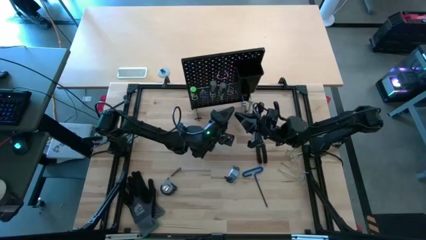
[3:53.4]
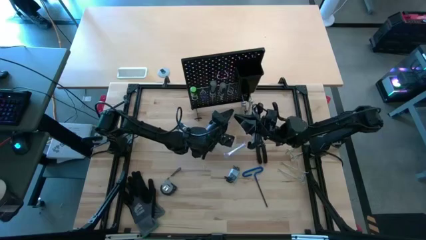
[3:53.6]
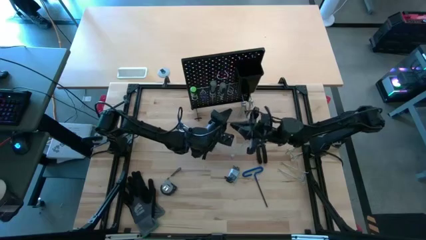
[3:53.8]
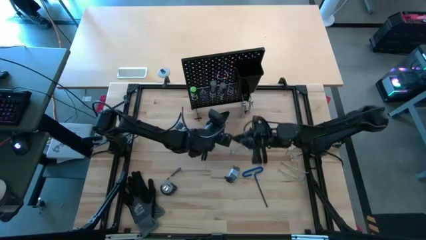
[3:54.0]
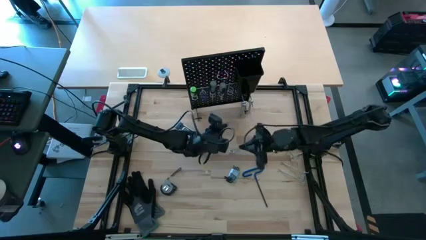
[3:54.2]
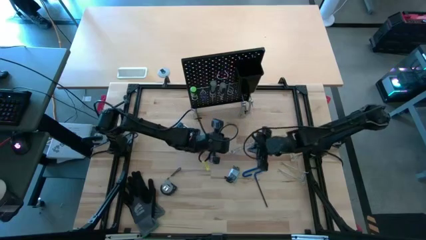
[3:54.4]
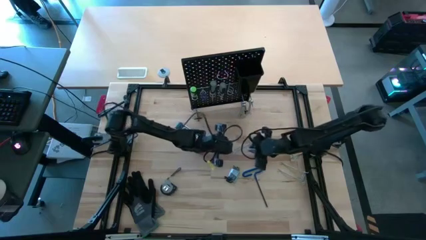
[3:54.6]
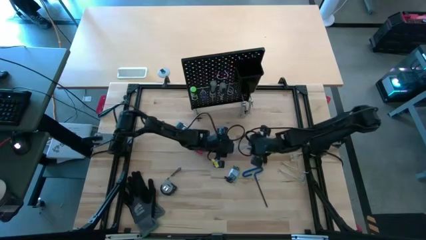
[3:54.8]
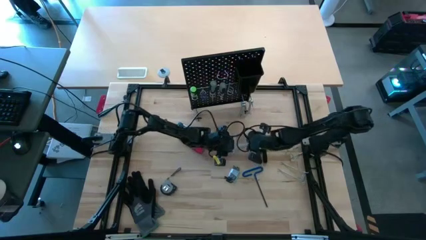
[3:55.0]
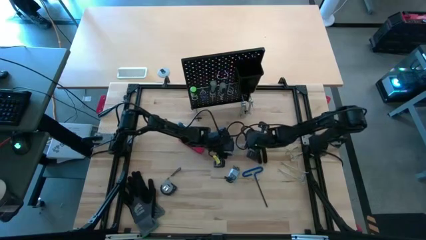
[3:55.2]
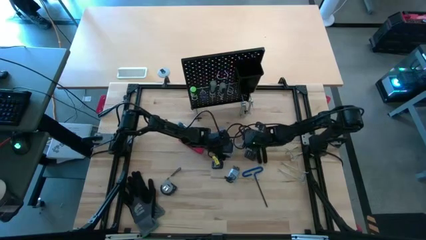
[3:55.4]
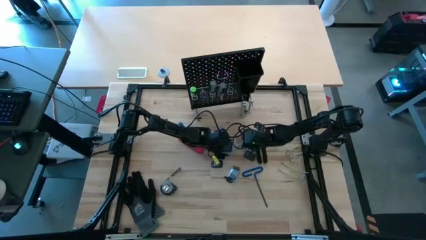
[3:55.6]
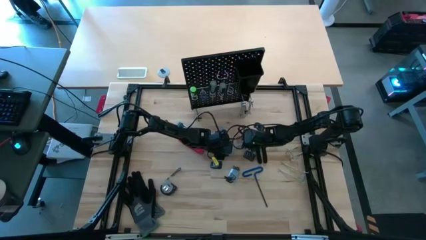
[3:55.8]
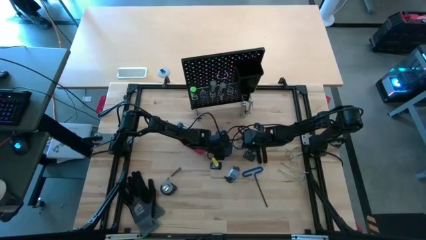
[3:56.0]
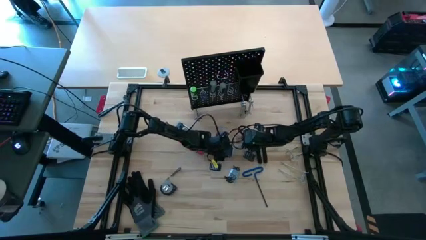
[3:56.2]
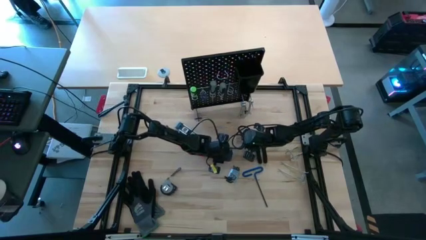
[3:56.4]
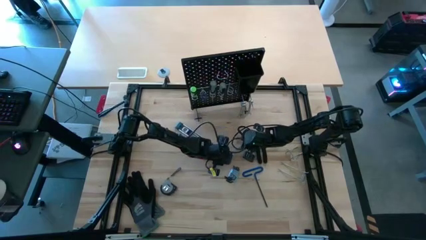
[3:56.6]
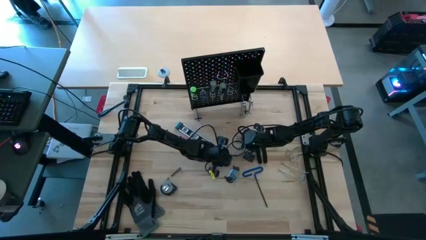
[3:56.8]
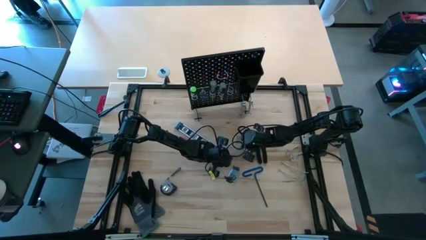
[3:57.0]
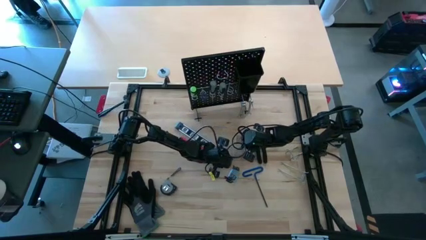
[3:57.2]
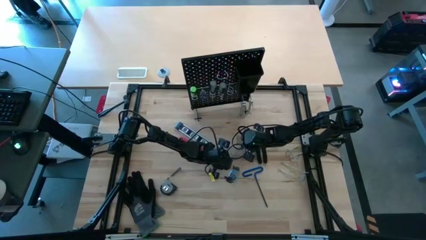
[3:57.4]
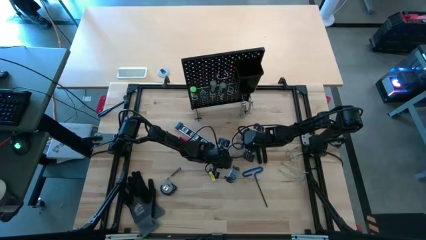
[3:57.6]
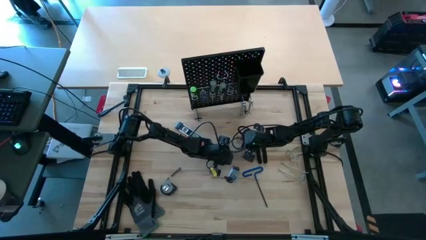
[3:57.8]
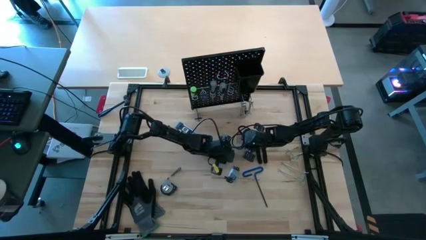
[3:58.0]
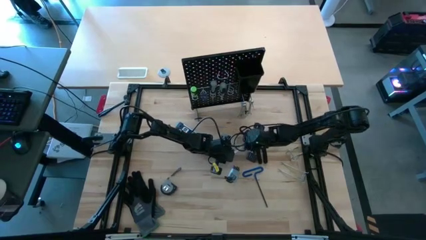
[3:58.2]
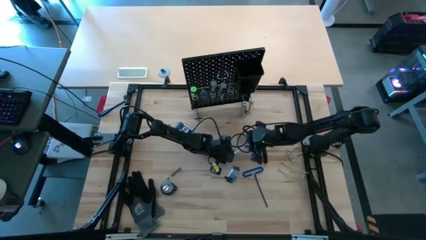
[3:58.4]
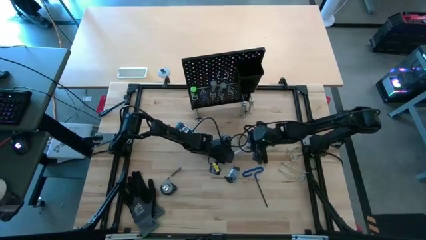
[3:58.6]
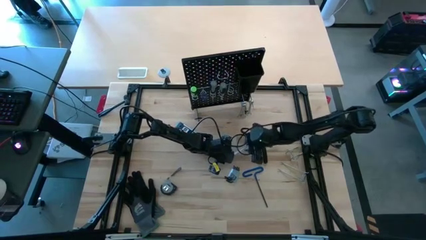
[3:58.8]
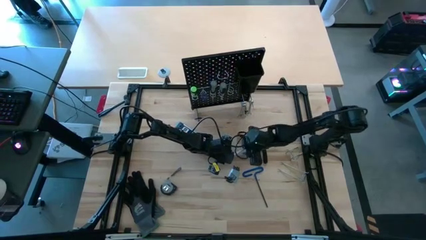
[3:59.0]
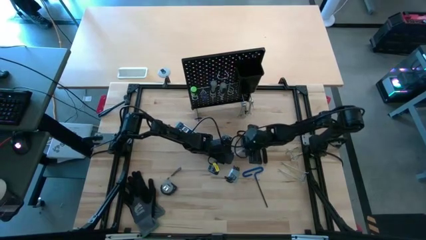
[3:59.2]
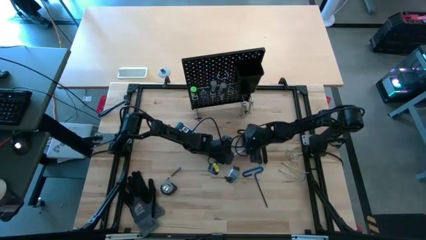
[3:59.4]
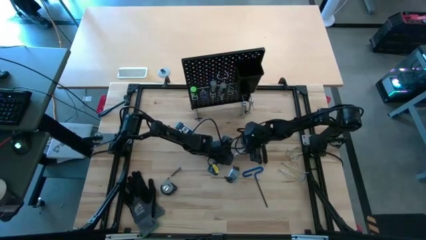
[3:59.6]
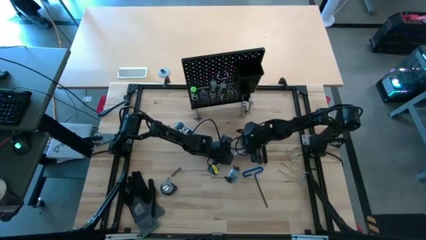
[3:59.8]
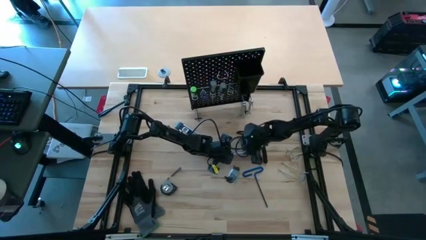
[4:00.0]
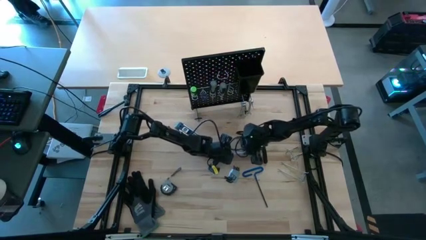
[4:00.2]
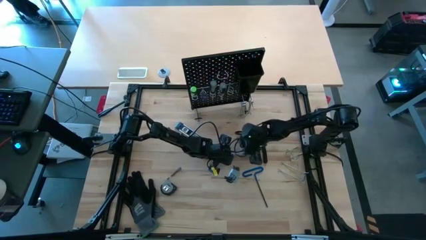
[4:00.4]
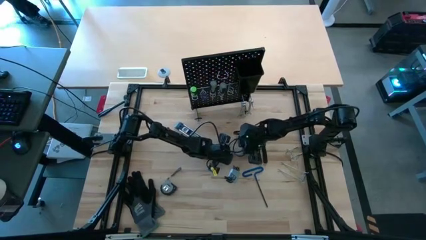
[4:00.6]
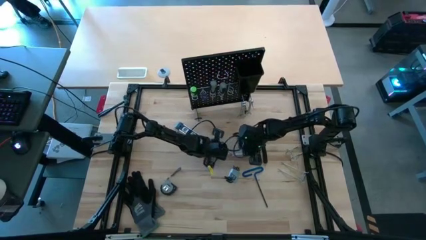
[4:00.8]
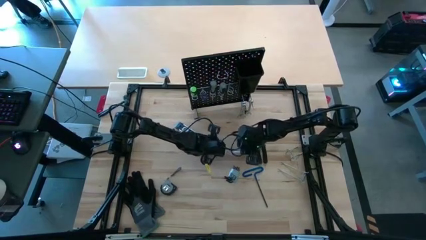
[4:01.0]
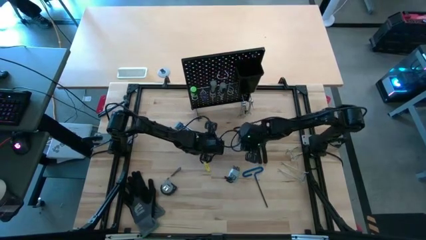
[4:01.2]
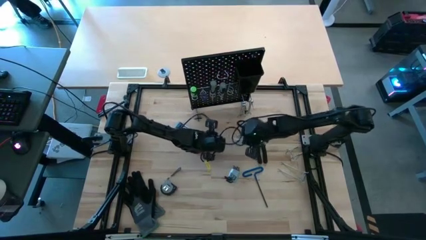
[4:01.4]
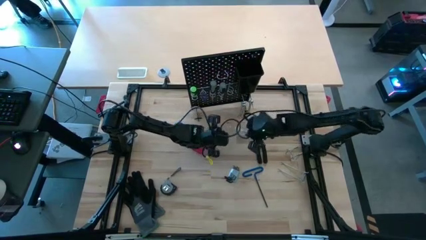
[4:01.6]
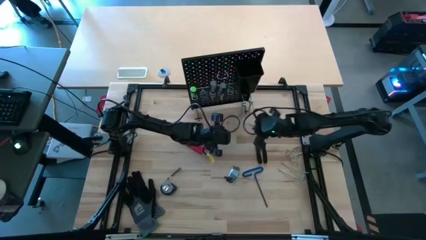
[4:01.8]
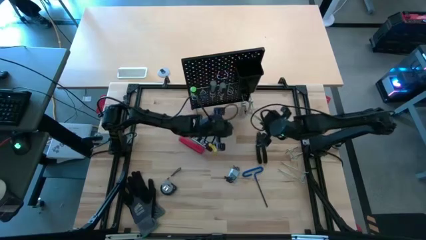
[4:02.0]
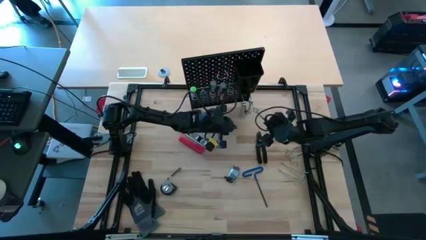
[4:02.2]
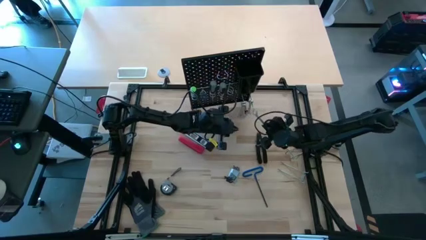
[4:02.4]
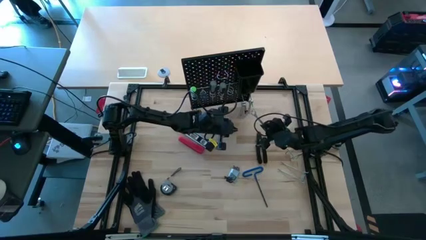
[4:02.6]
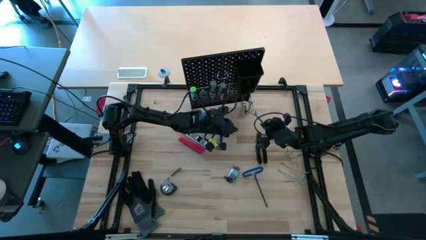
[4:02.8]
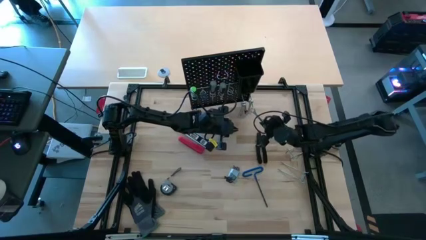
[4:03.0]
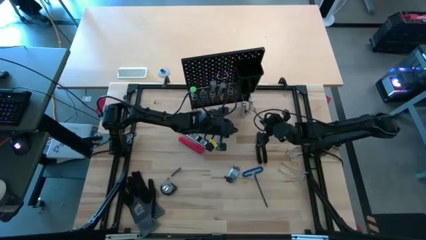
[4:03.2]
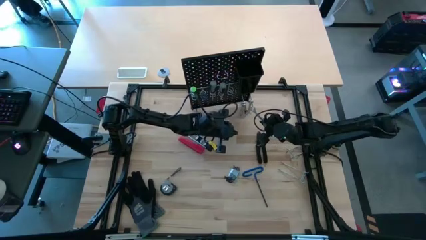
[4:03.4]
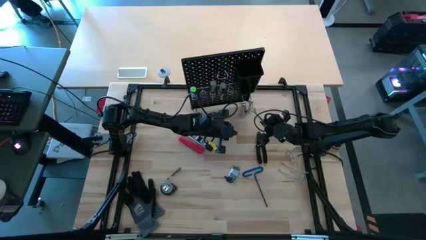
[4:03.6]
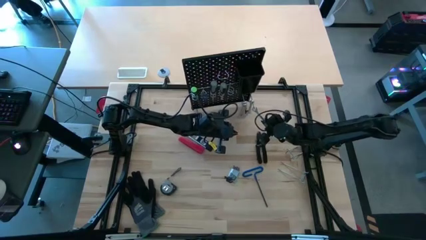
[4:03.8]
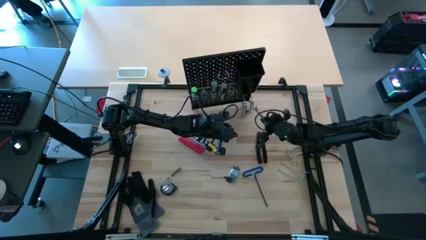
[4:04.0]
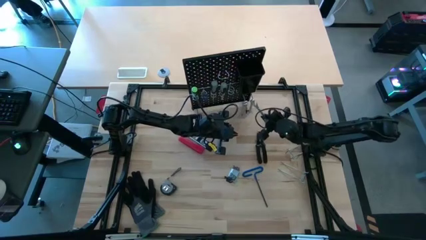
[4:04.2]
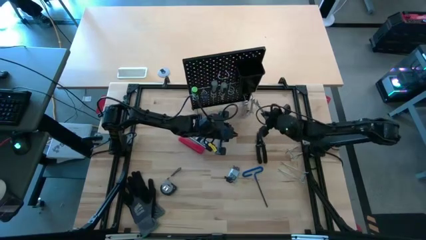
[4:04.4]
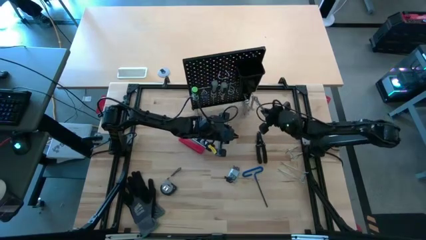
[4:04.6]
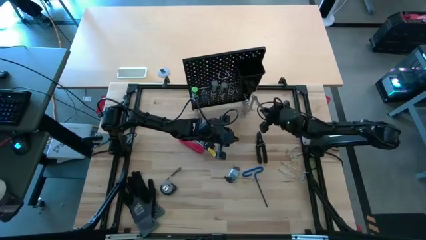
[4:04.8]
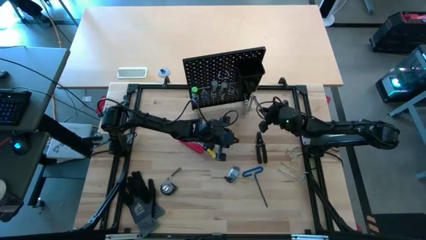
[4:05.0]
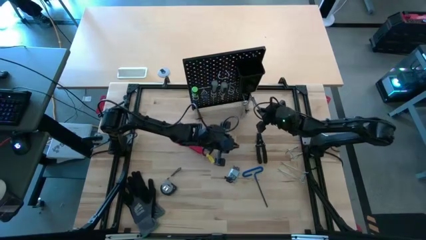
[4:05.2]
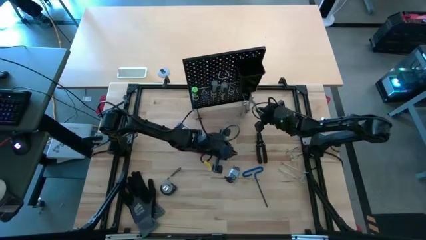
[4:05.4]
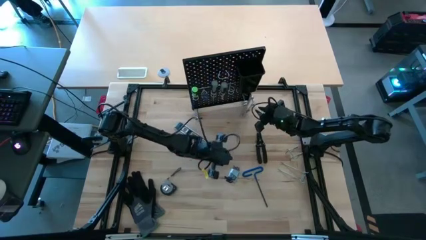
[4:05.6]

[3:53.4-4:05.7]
Task: Hang tools onto peg board
Hang the wrench onto the pegboard

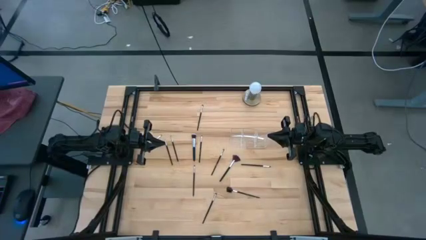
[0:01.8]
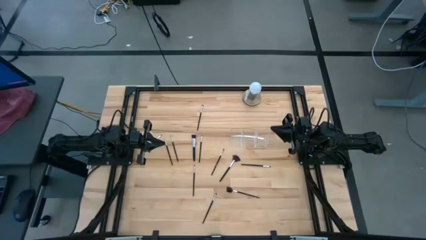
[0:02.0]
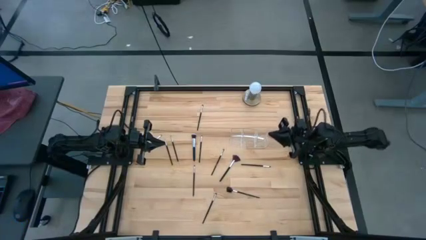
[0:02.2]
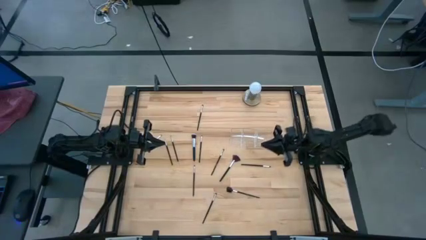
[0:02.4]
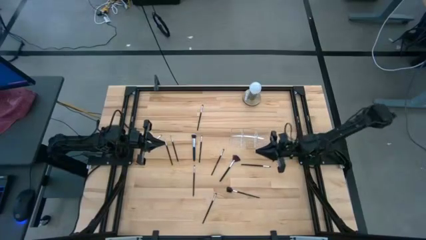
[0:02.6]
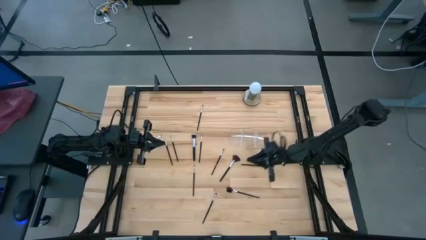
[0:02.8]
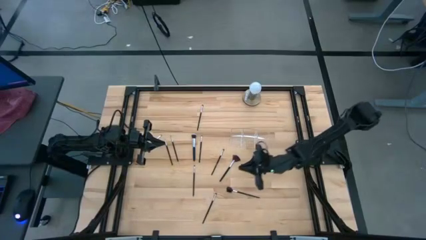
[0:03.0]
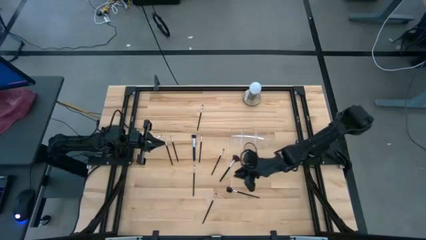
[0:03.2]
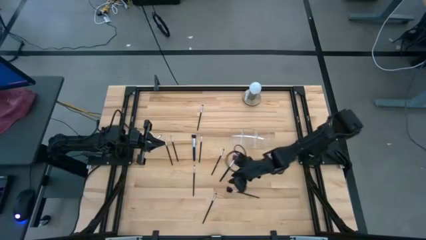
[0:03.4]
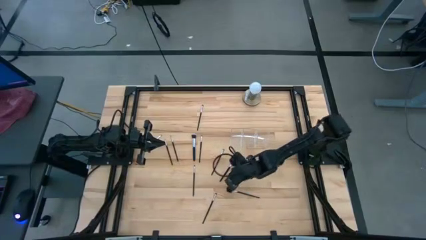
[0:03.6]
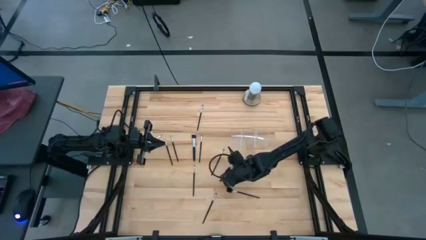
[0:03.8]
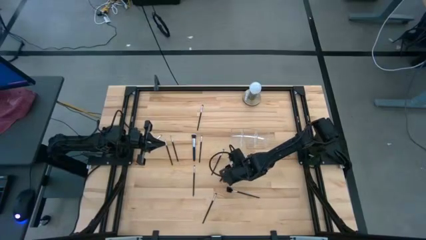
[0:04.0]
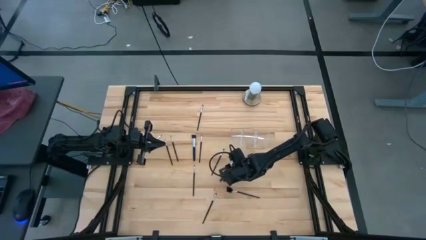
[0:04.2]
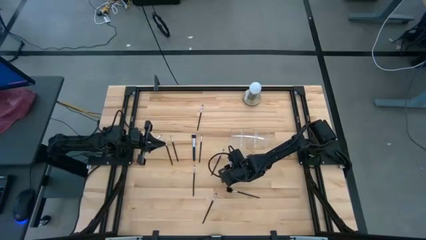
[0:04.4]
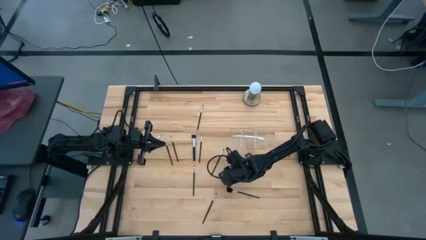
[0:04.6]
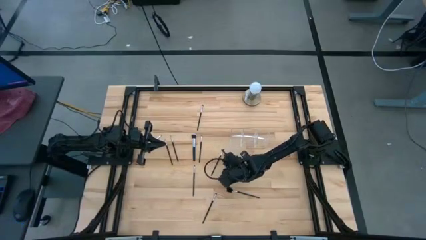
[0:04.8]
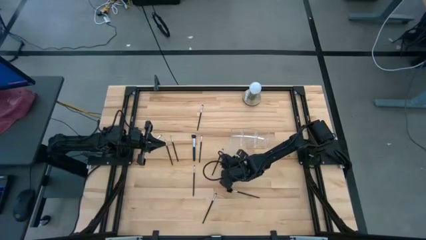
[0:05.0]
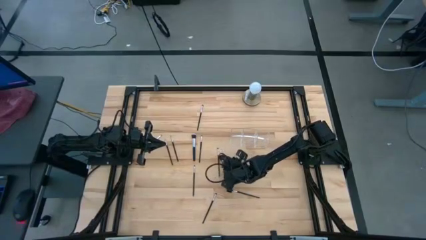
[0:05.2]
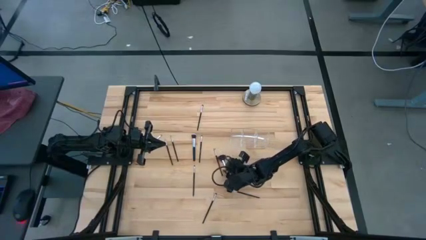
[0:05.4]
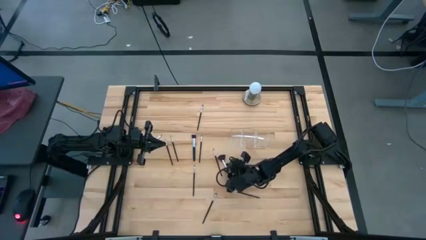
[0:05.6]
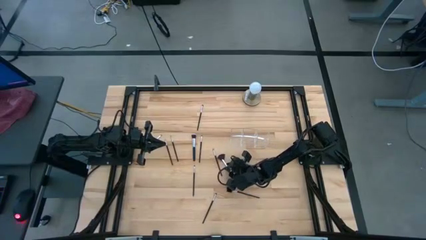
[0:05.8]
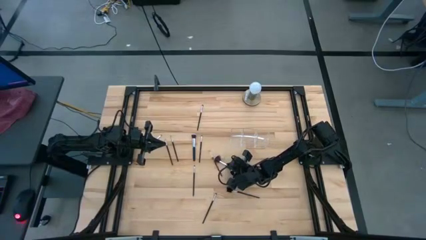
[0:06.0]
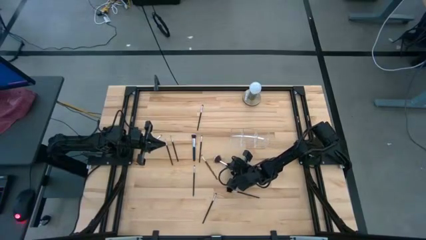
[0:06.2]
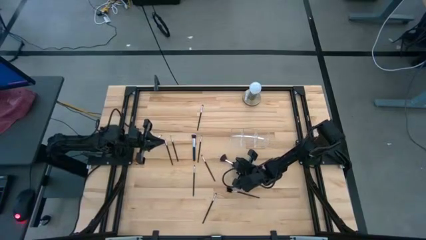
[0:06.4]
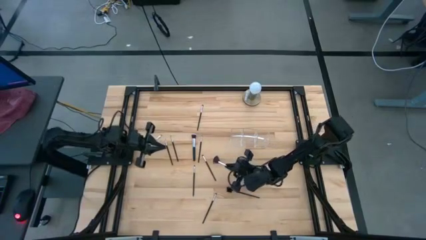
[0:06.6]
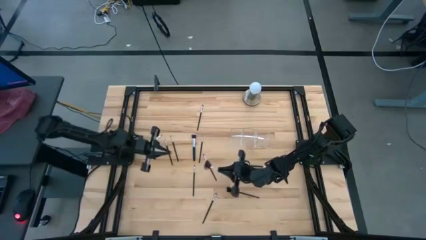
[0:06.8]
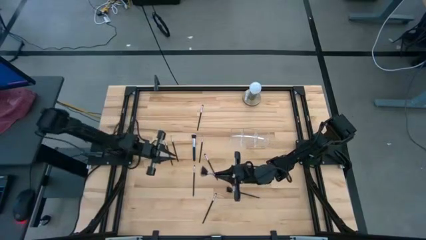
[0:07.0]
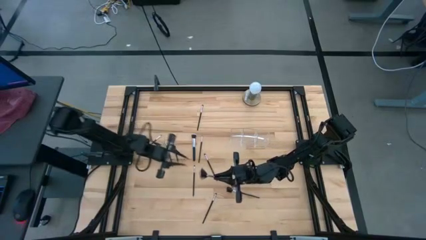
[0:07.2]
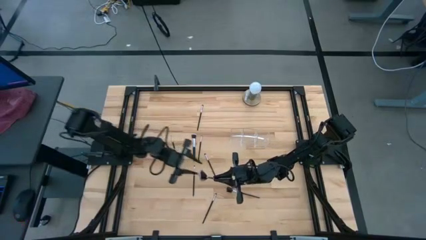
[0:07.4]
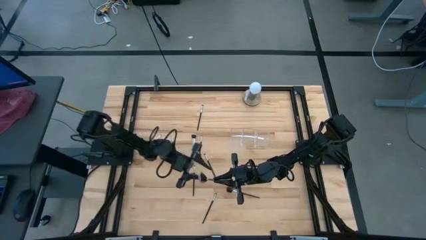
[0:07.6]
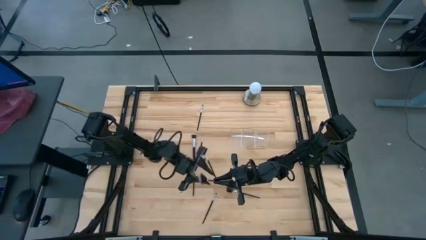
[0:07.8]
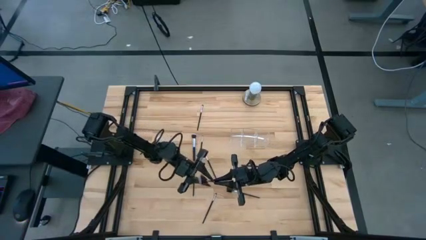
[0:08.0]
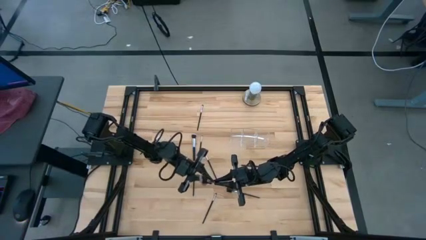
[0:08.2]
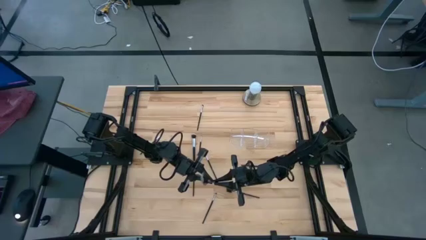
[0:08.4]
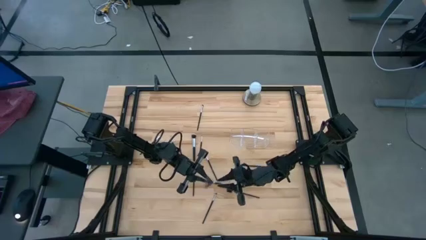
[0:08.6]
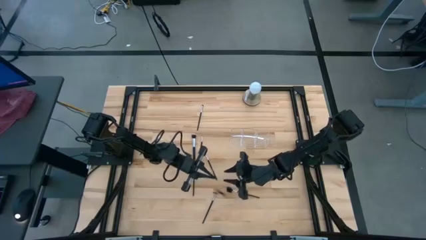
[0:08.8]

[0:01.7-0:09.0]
Task: Put items in baskets/containers
Put the black highlighter brush into the transparent organizer
